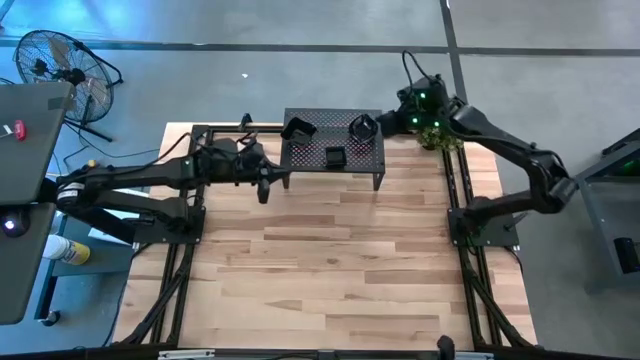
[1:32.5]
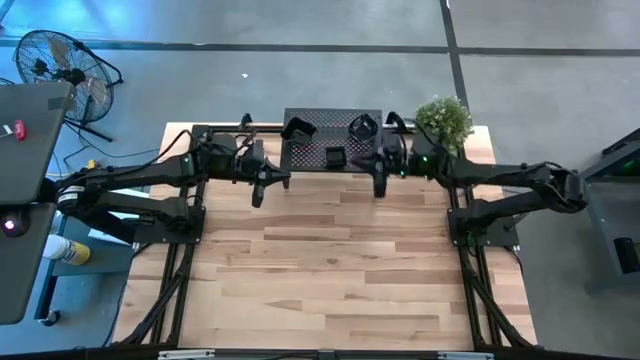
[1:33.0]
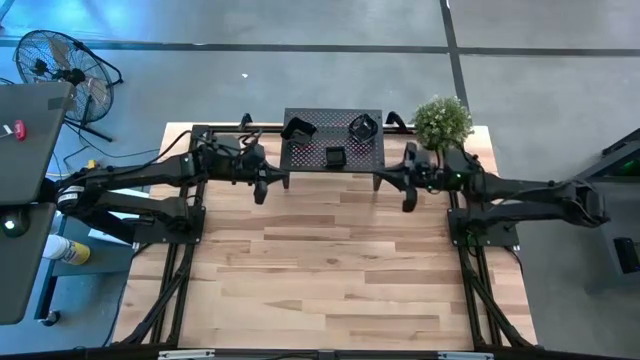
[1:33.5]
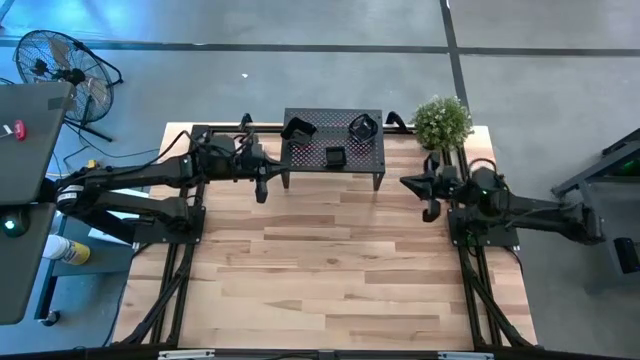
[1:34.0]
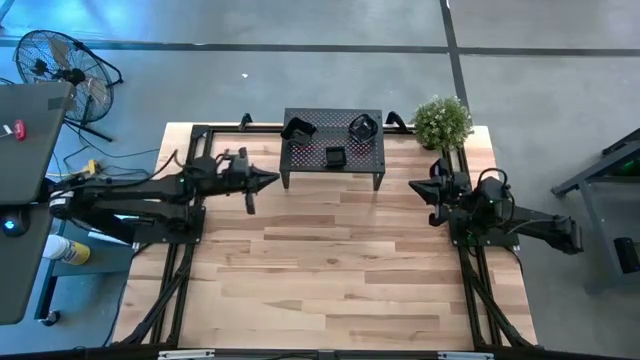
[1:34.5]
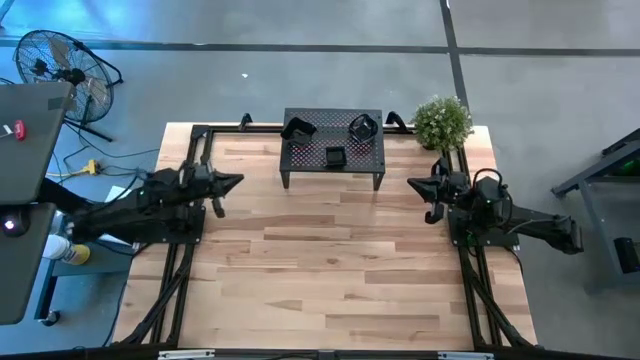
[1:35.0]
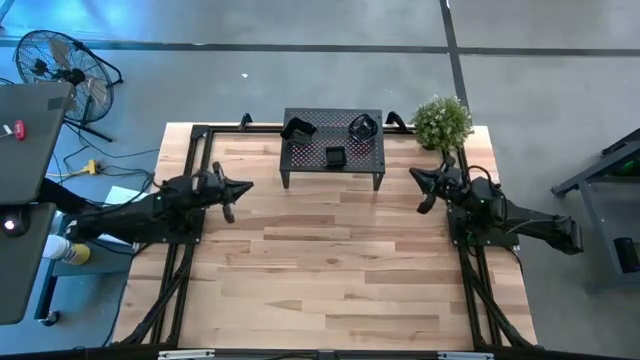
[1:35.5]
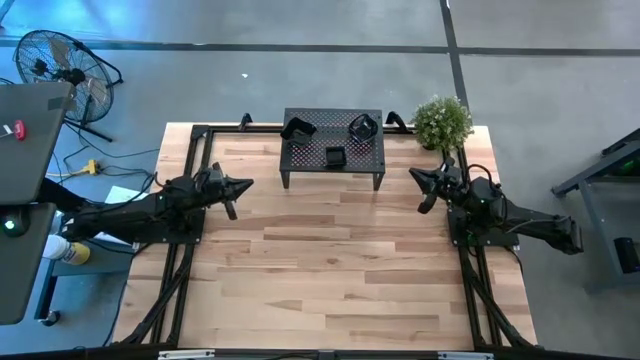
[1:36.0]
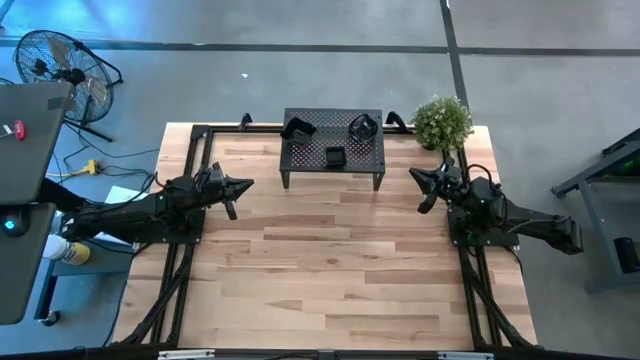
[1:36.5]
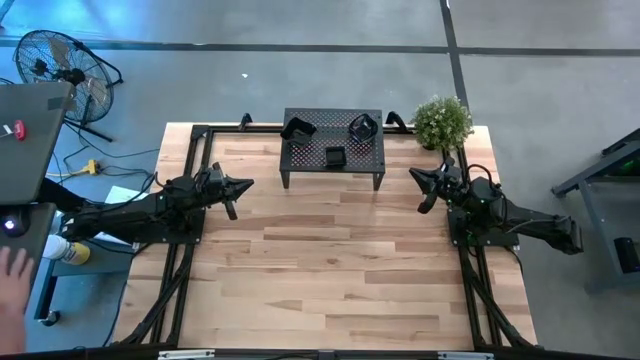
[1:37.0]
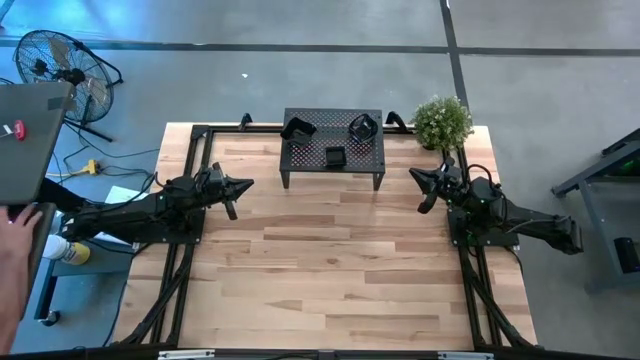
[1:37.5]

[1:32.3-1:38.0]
Task: Pick & Place Mini shaped plates
Return to Home Position

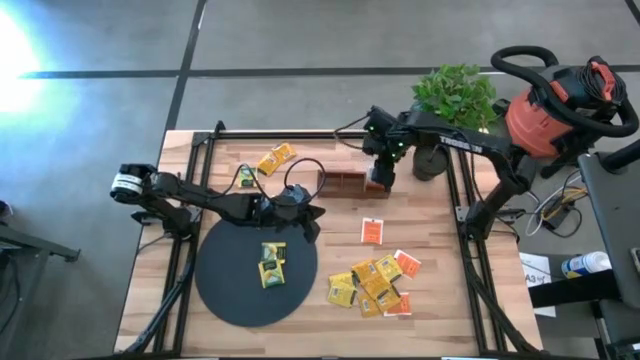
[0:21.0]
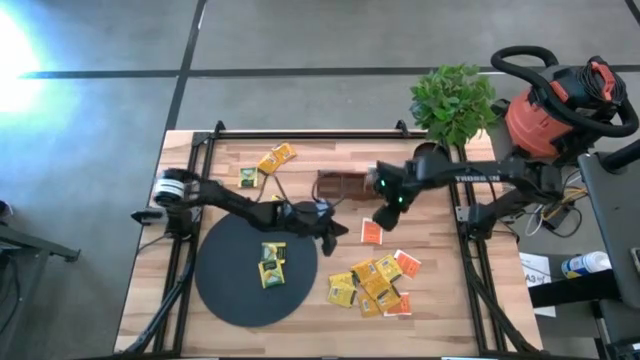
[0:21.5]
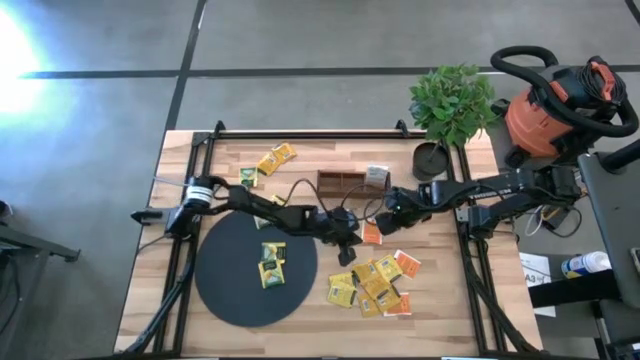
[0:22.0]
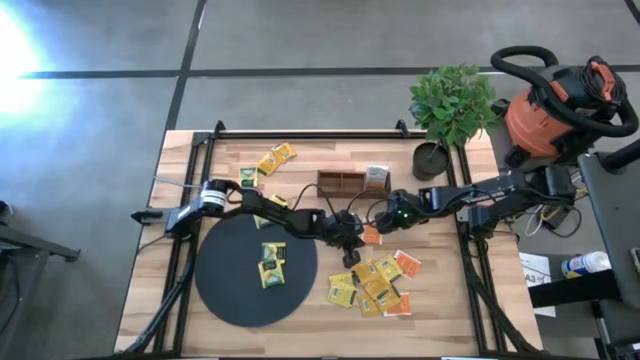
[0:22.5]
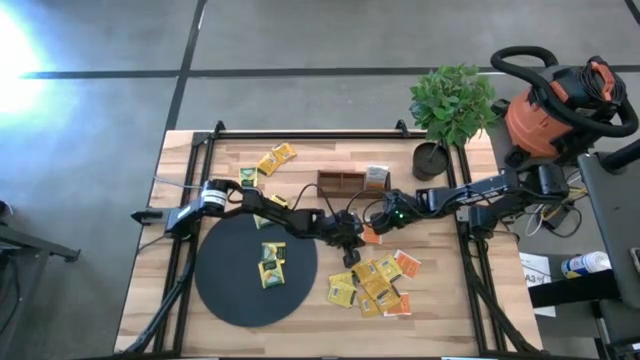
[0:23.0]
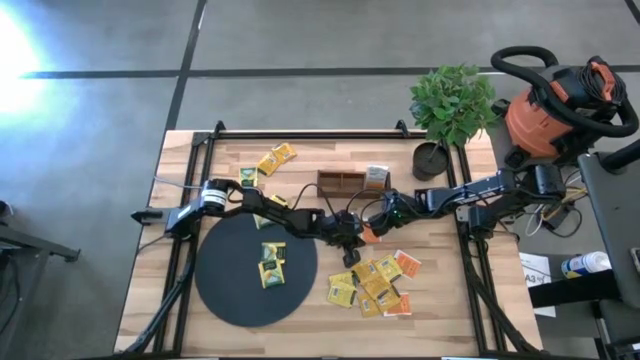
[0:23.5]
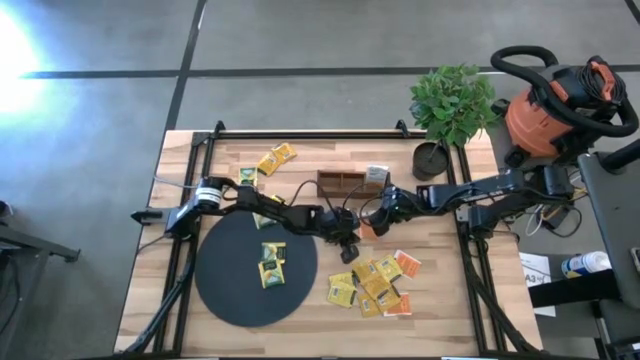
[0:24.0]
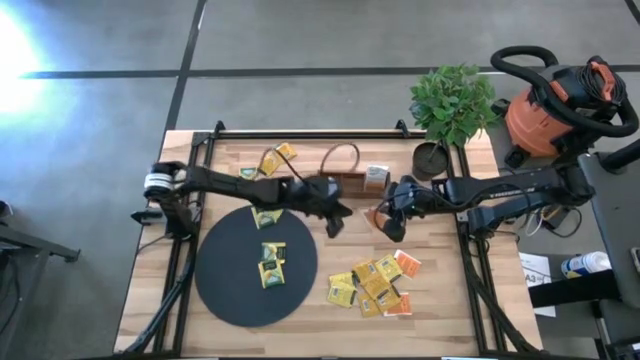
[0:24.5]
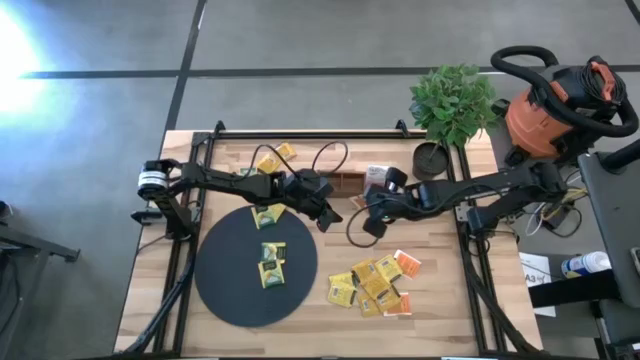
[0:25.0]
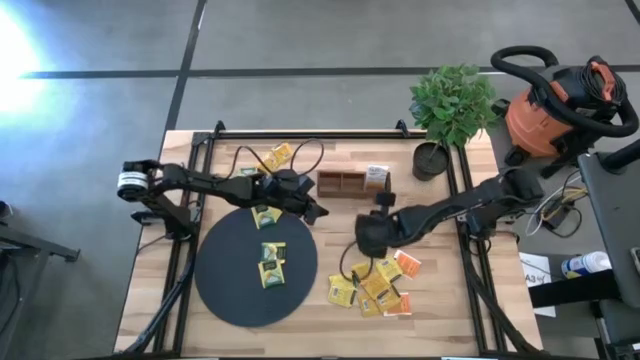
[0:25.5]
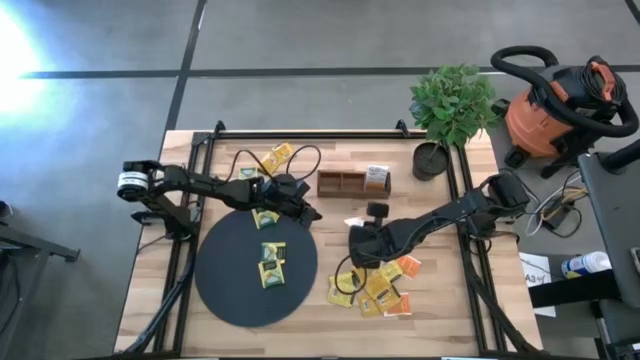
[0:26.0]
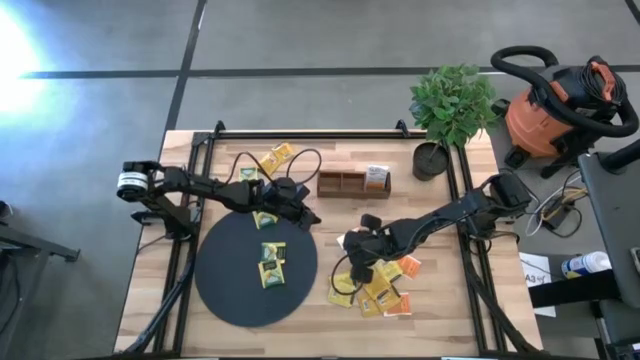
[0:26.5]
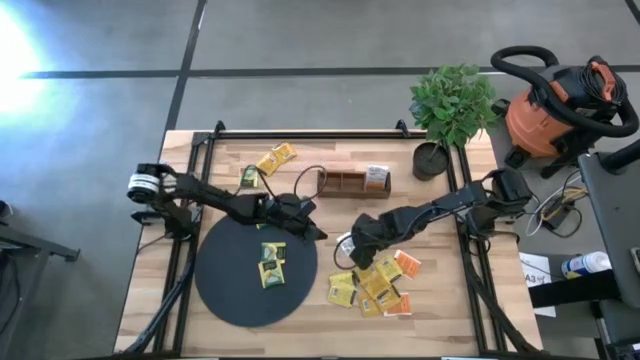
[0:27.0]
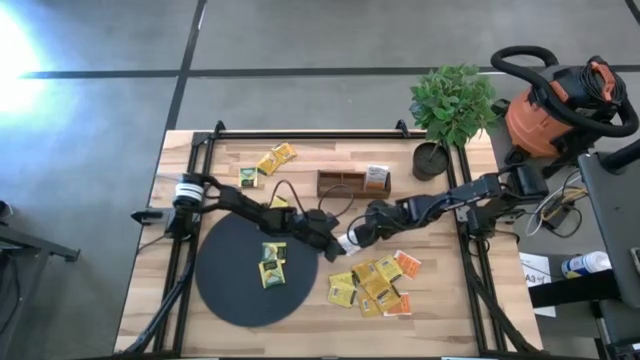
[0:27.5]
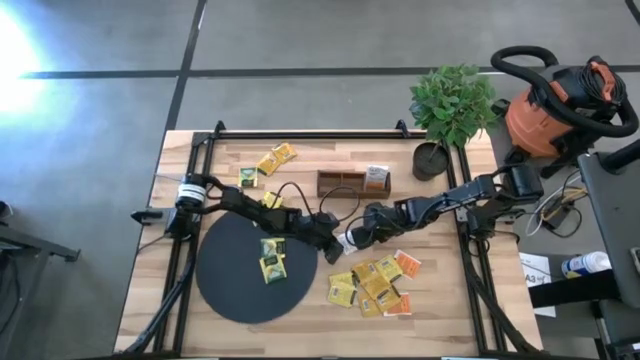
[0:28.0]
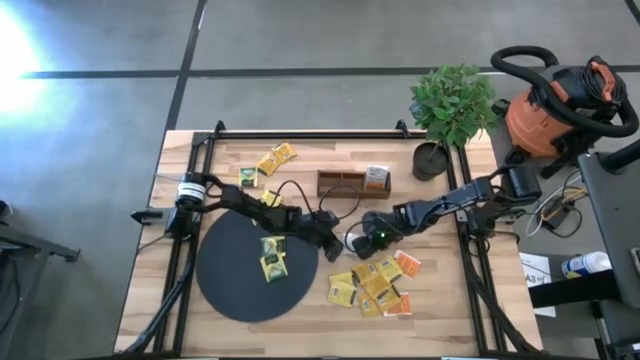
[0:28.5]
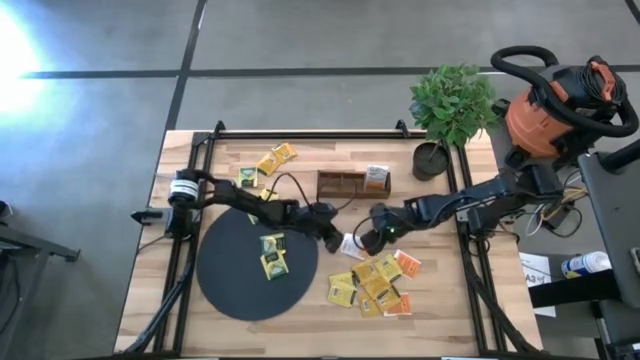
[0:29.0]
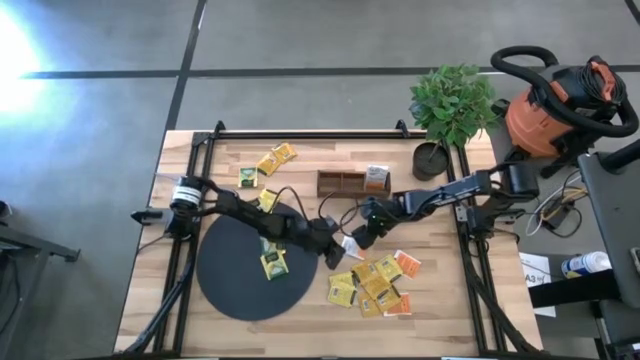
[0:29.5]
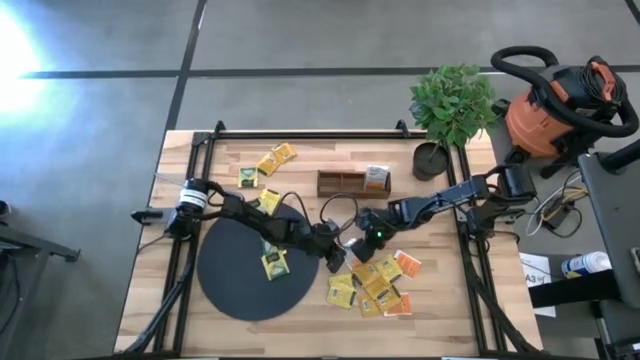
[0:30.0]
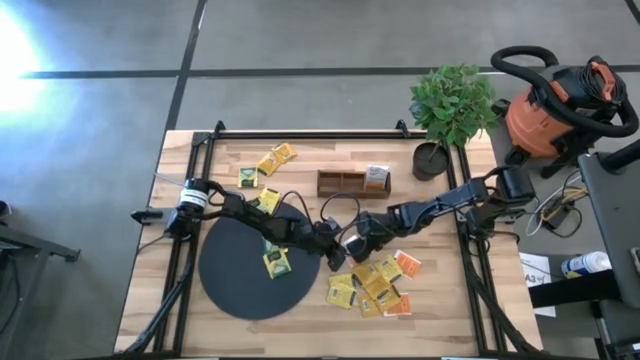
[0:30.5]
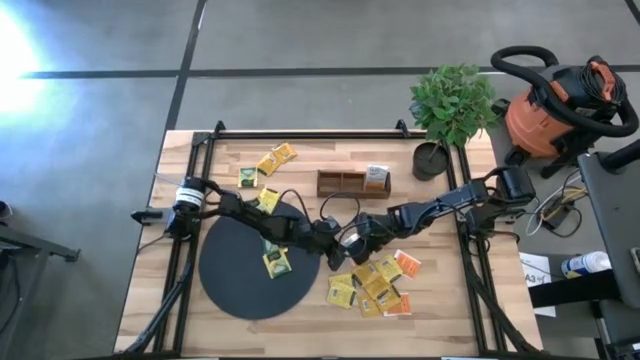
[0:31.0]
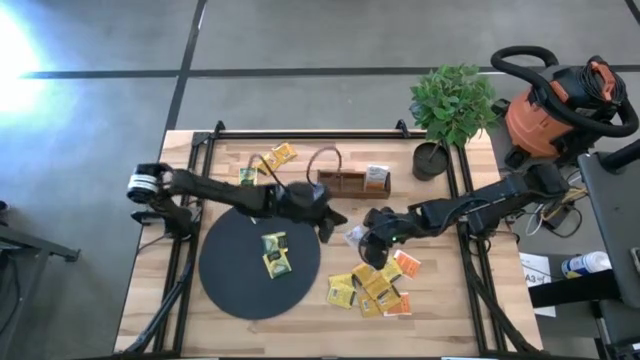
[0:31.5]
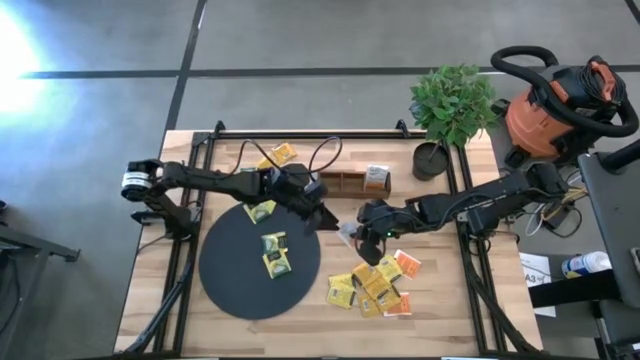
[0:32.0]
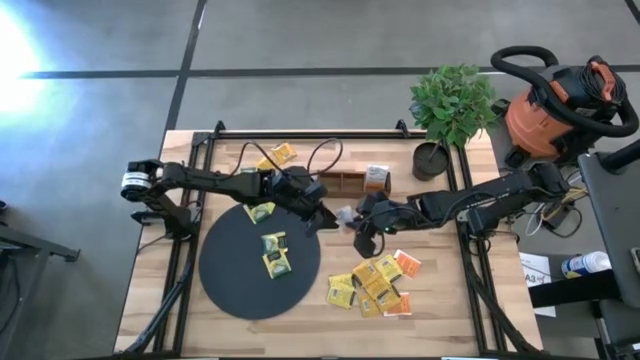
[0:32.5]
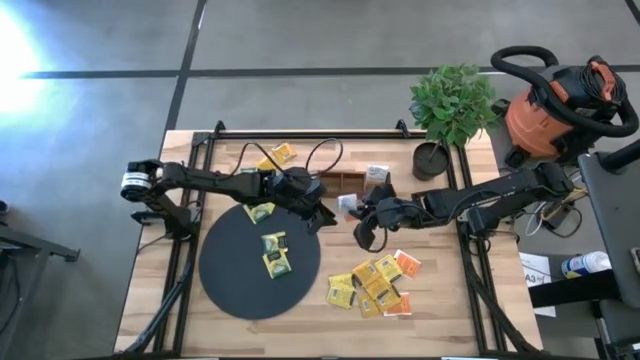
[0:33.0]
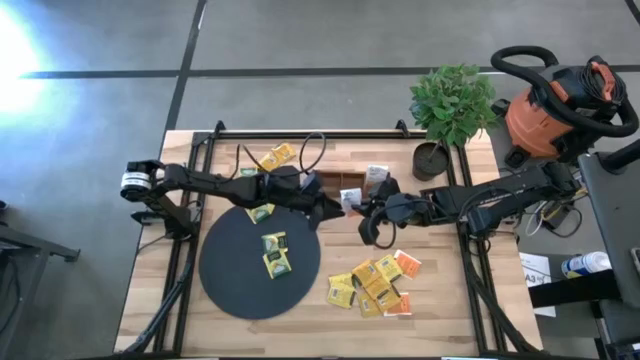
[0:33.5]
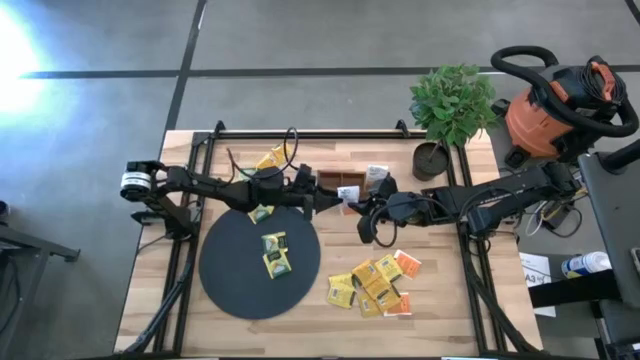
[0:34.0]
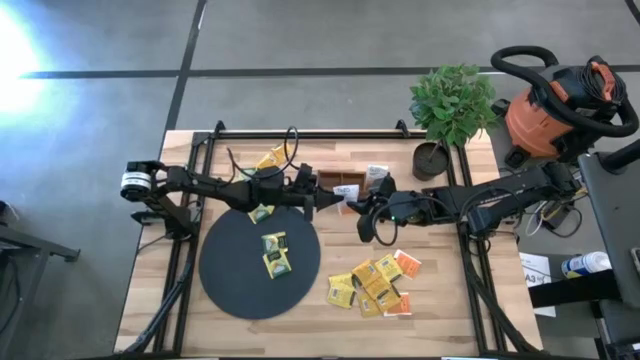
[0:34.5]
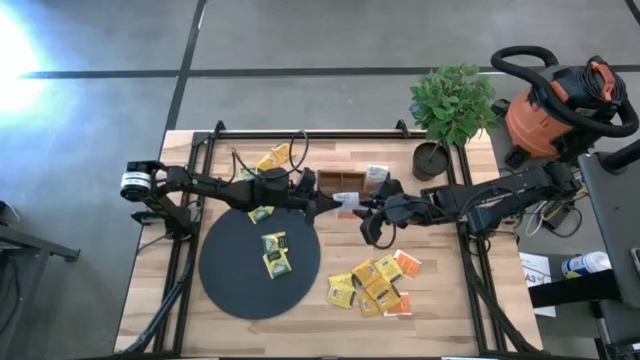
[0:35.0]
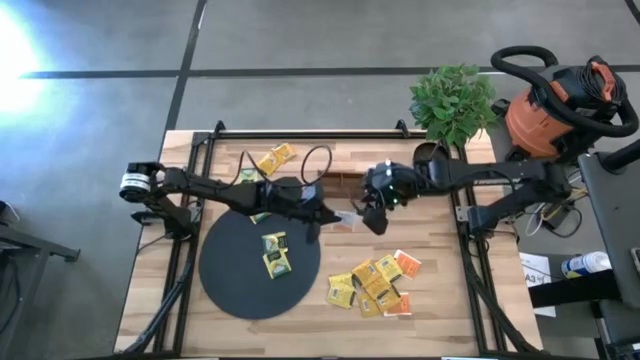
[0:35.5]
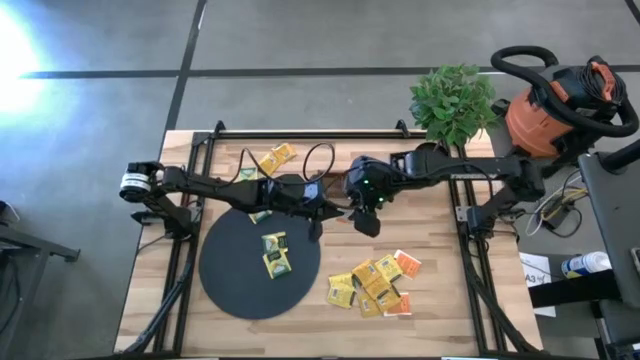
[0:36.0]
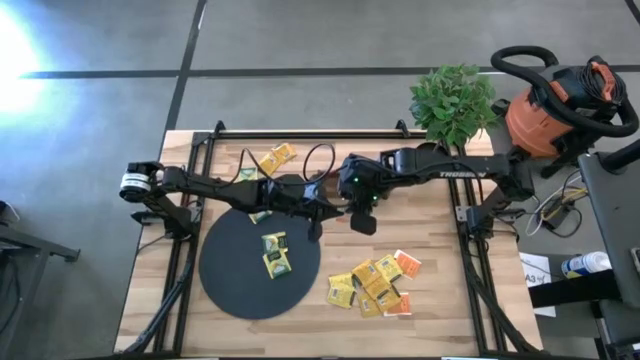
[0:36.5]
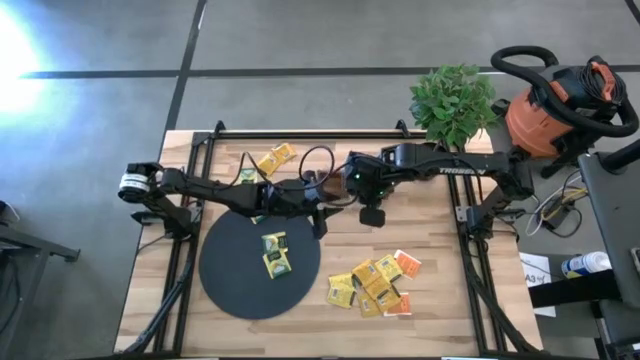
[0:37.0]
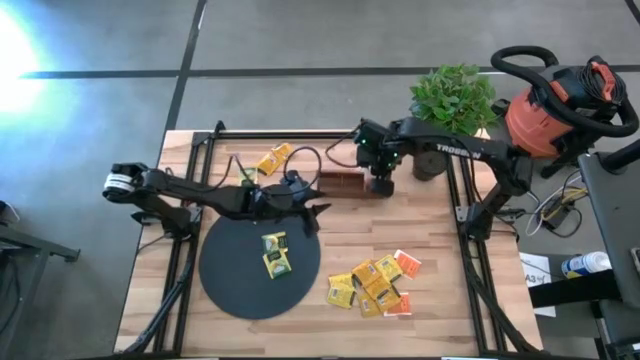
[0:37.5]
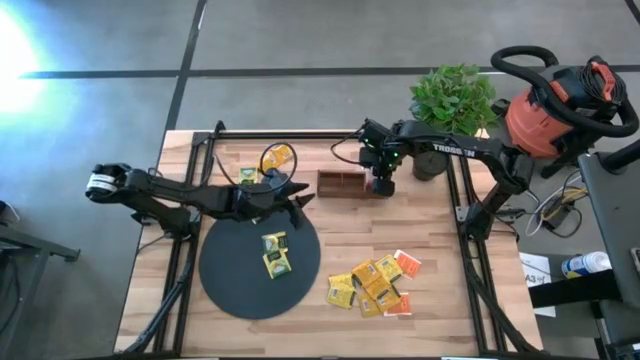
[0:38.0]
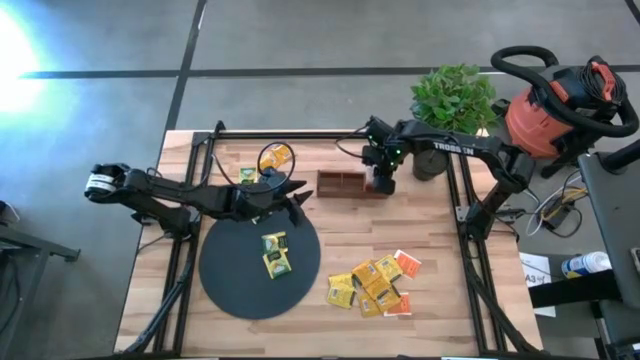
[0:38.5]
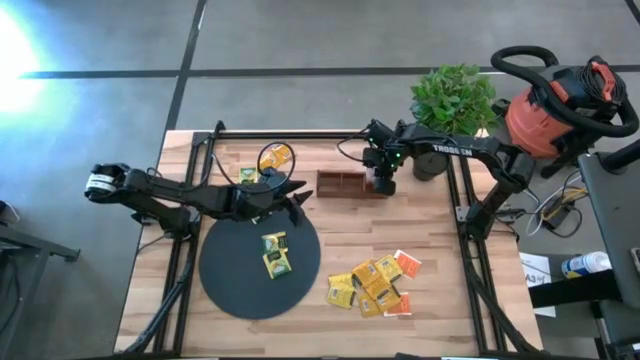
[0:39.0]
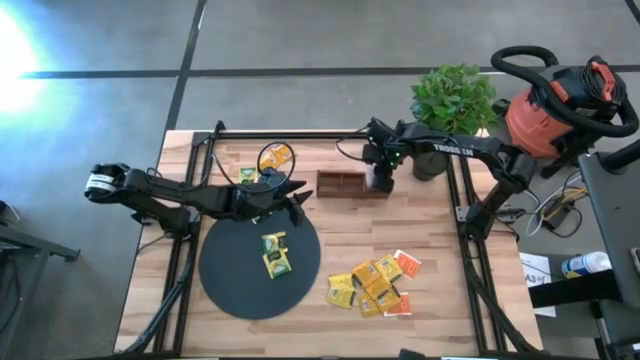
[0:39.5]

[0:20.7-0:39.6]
Task: Pick & Place Tea
Put the top white tea bag into the right section of the wooden organizer
